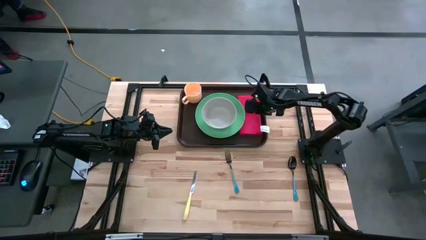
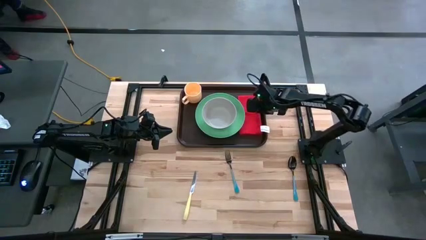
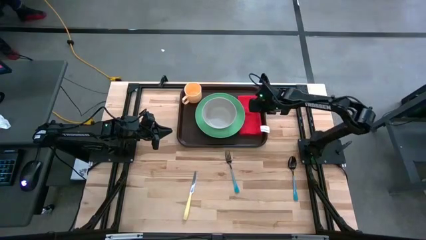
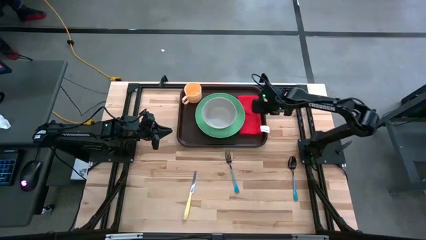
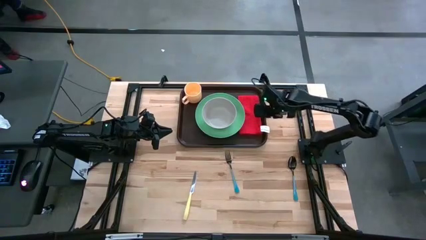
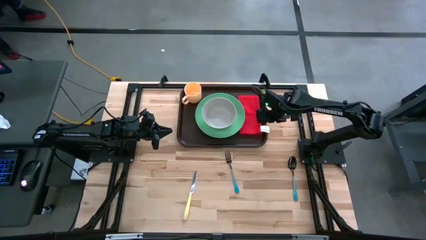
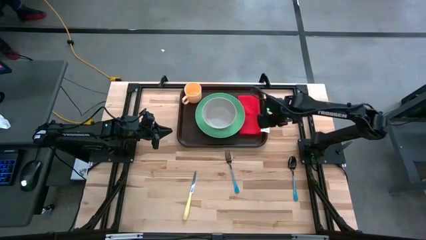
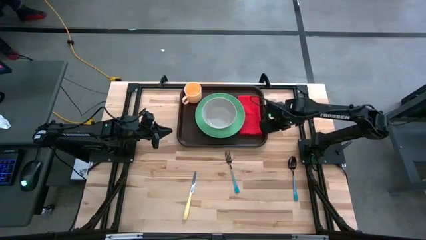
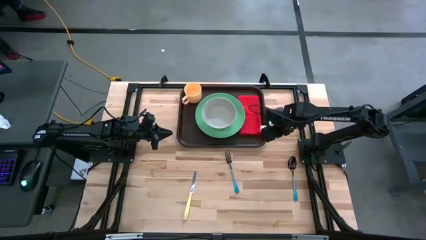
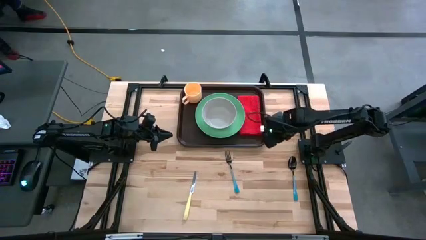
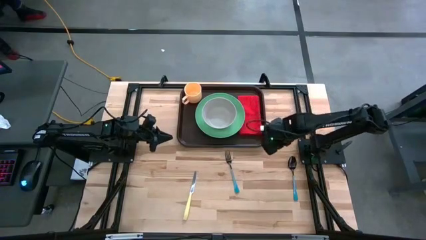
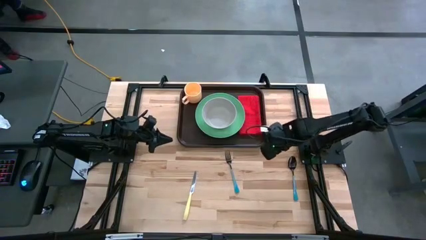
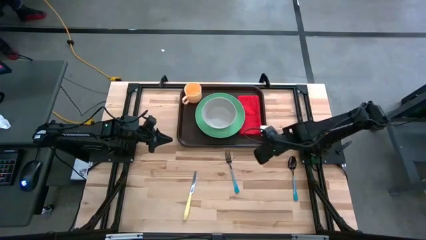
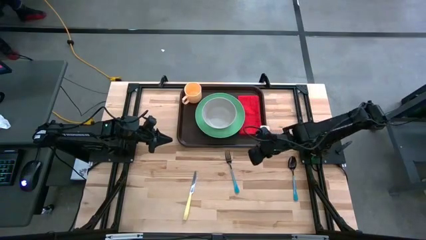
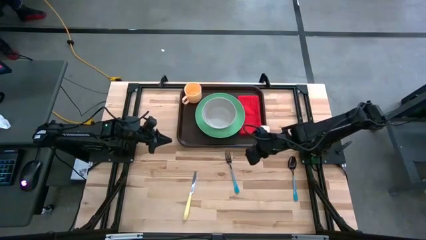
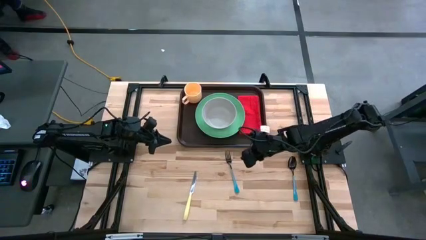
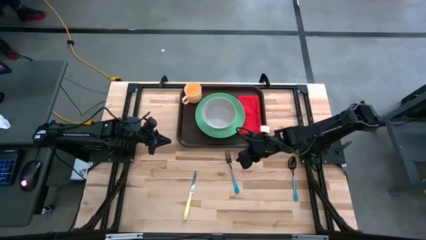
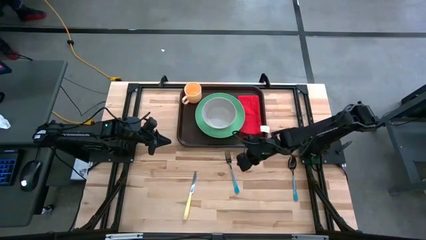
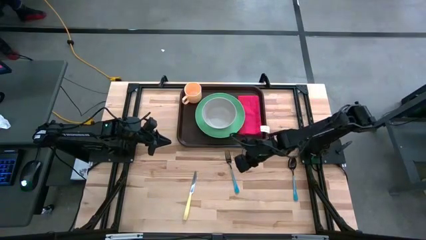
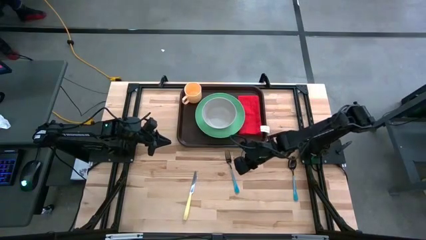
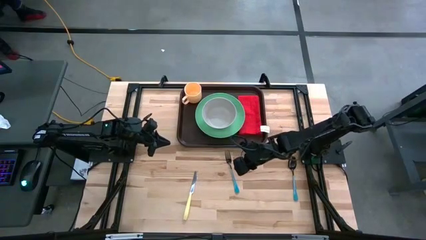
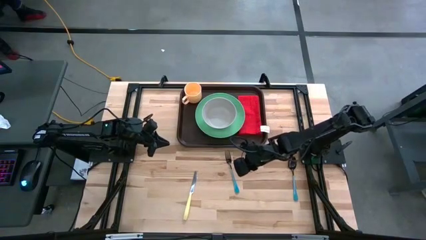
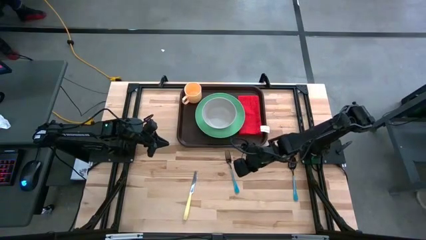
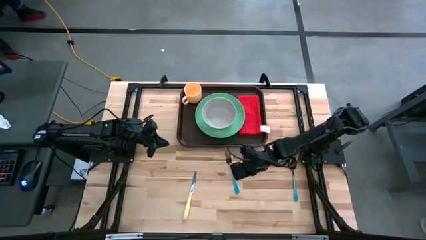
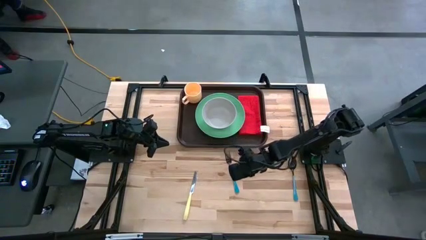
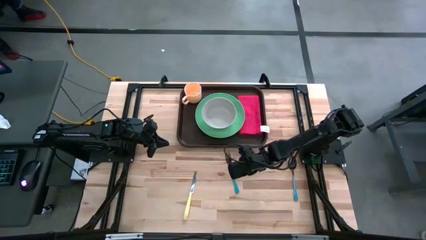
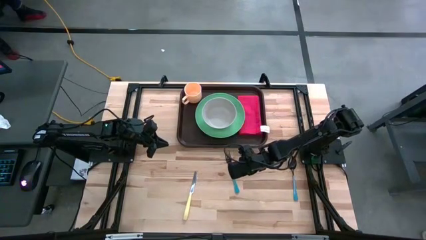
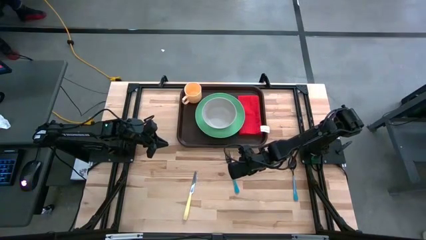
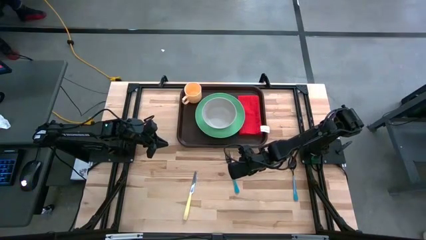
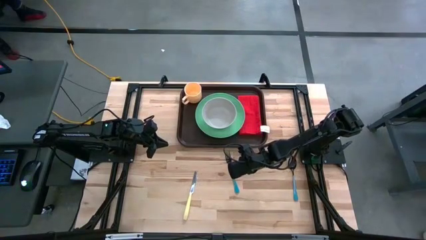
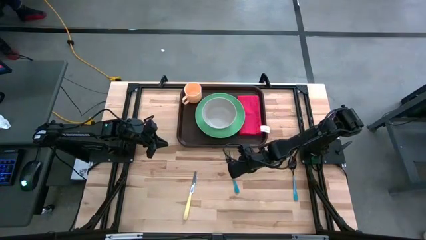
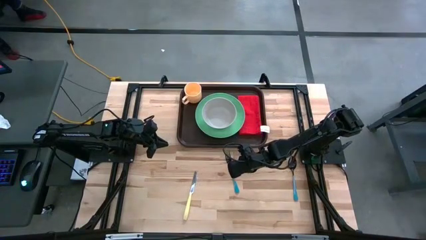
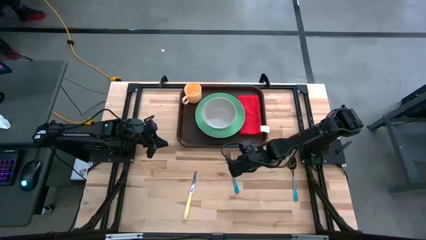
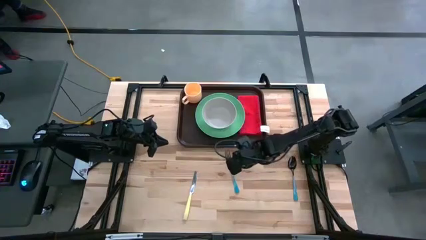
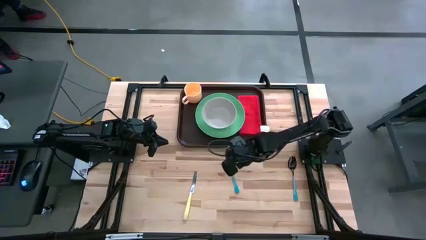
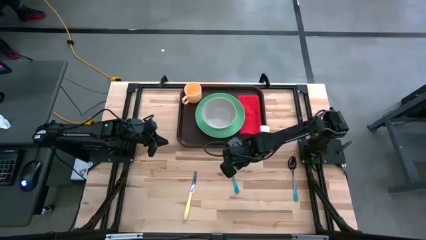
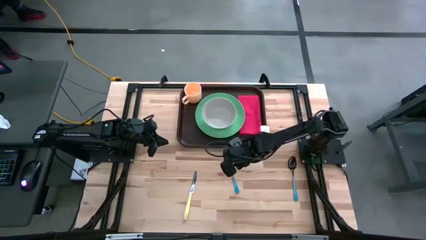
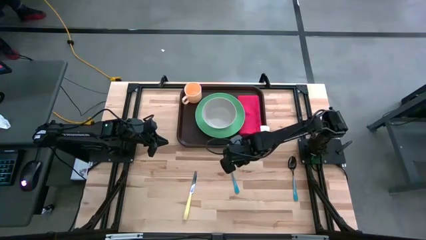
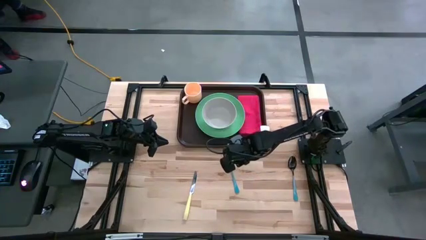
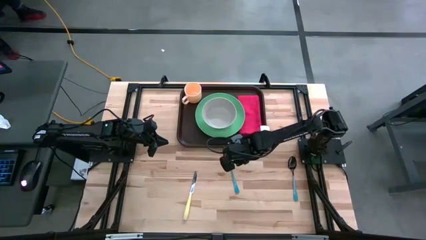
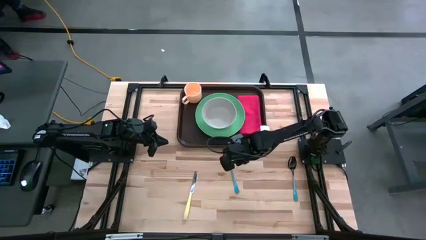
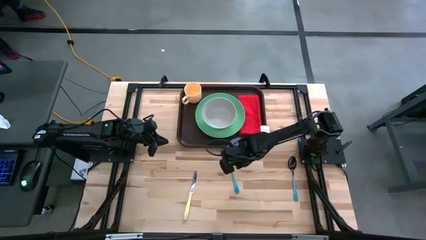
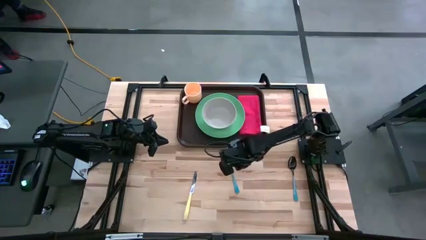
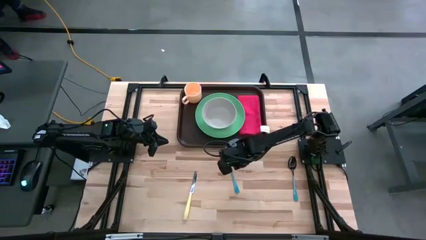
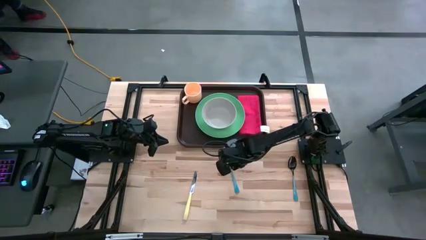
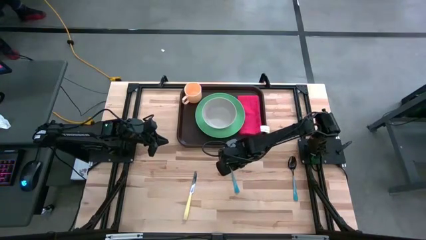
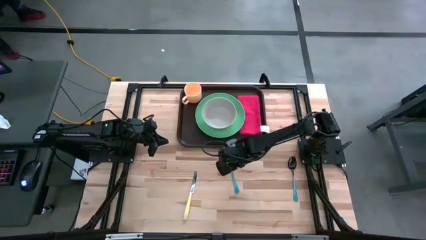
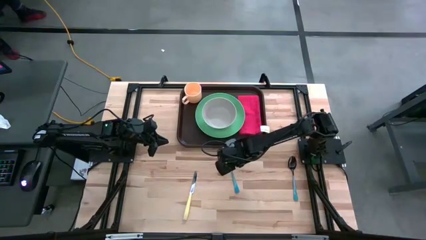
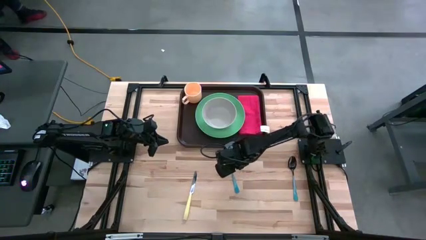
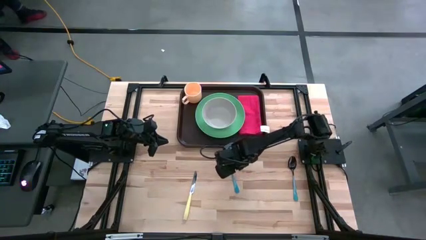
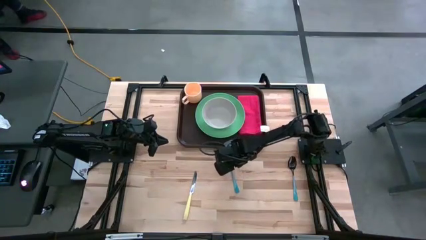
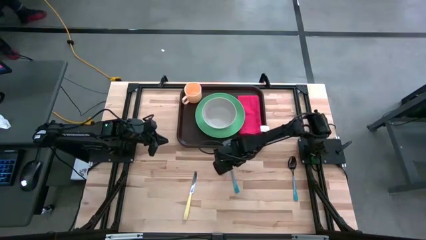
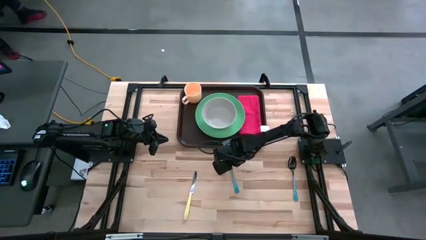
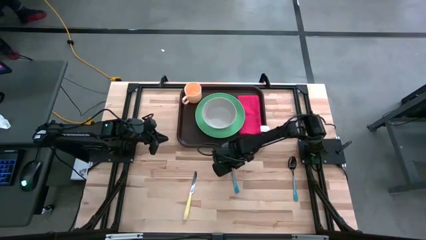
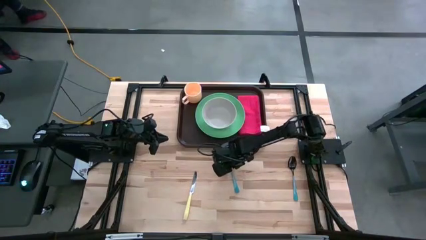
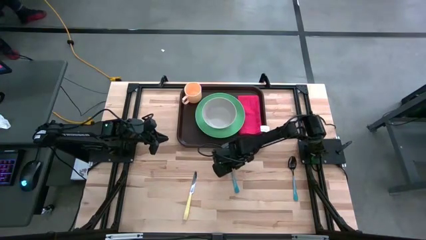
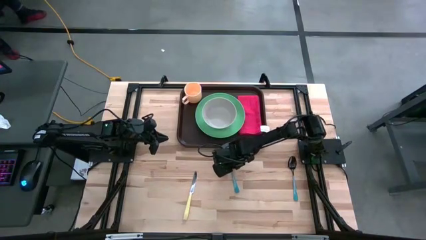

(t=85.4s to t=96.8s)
Task: Set up tray
Put the blue fork on top of the red napkin
